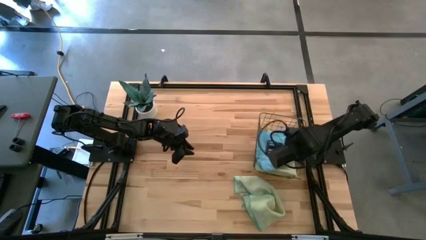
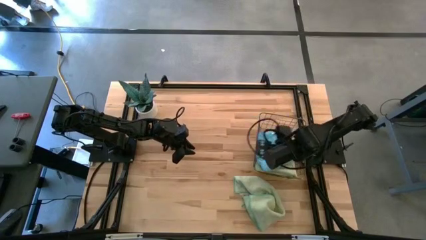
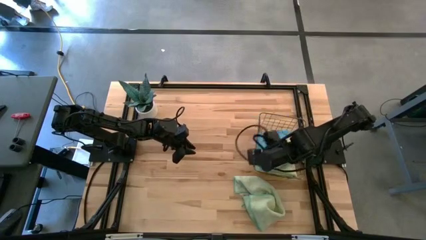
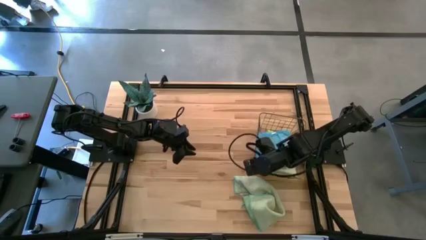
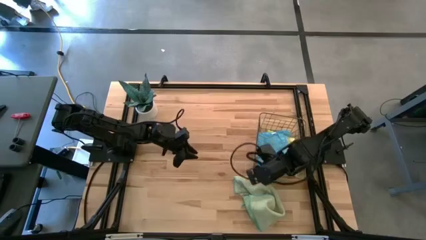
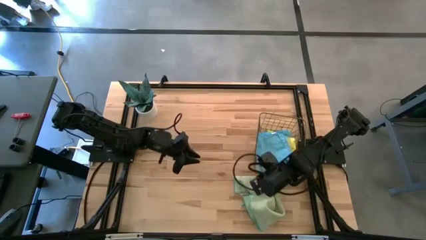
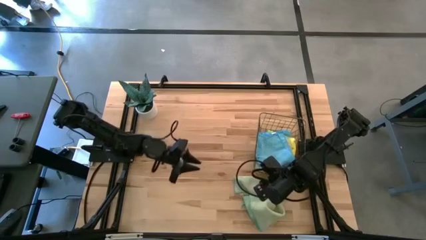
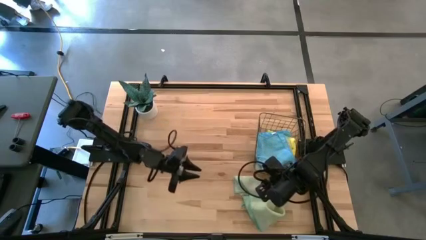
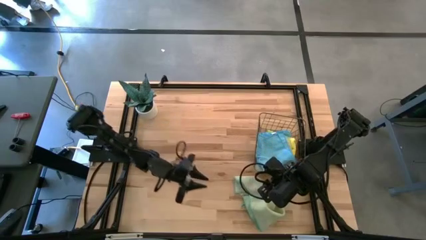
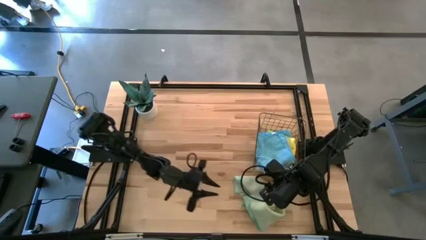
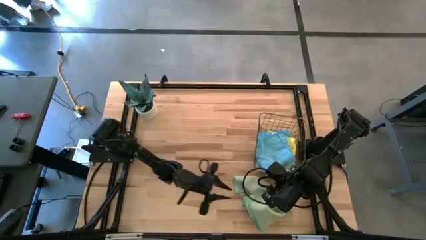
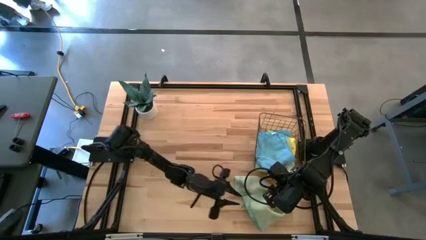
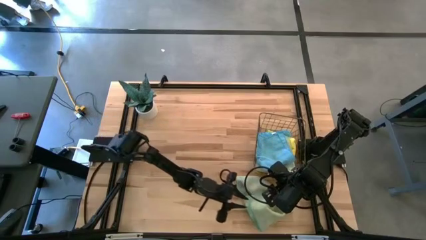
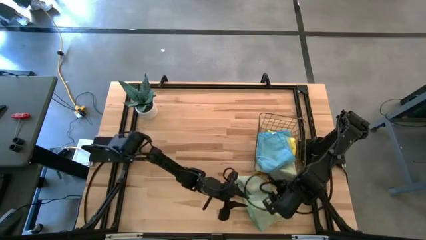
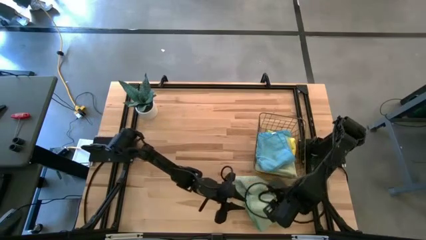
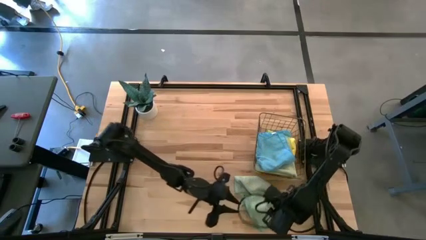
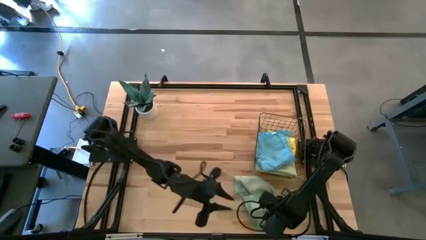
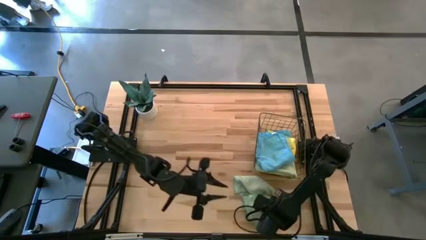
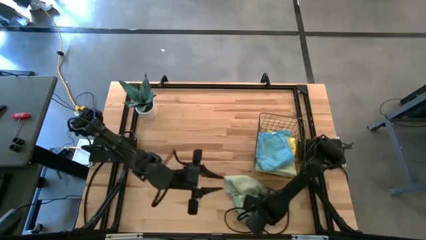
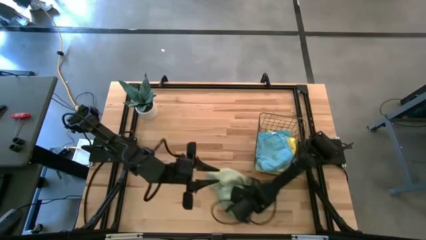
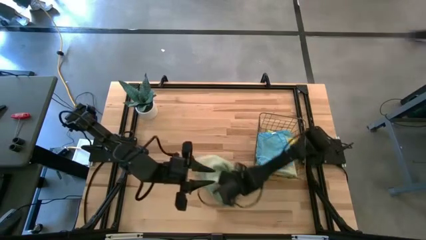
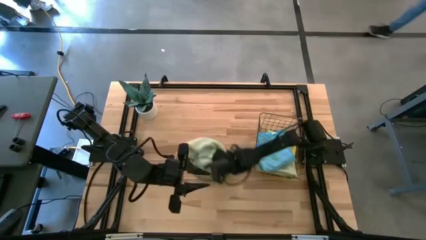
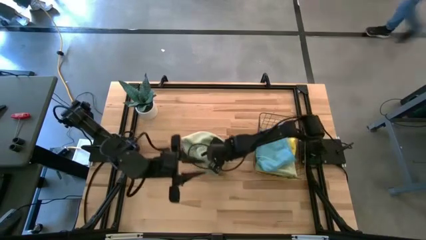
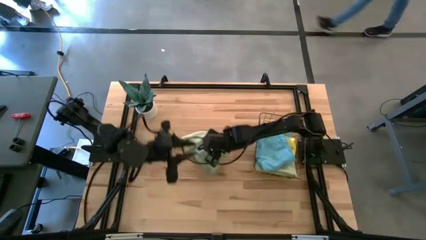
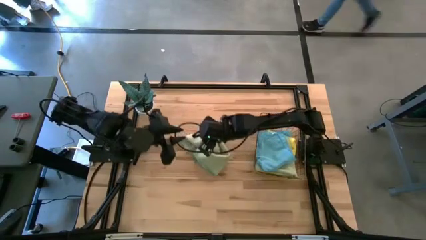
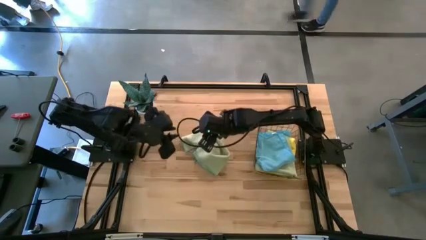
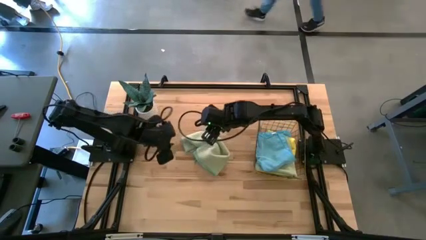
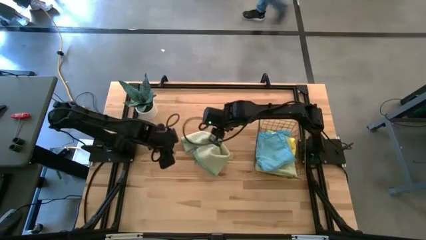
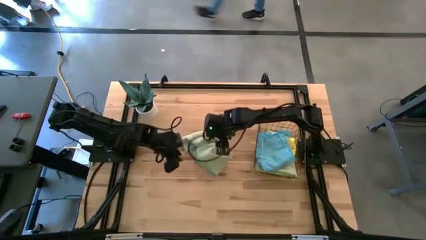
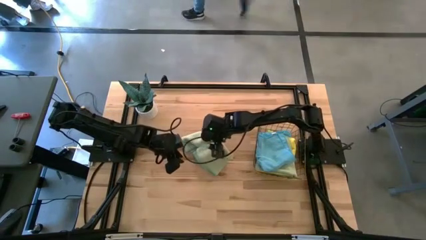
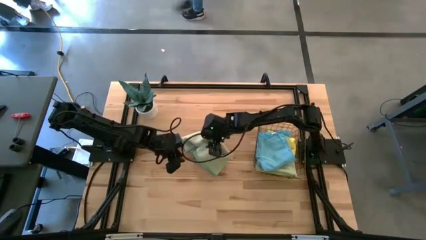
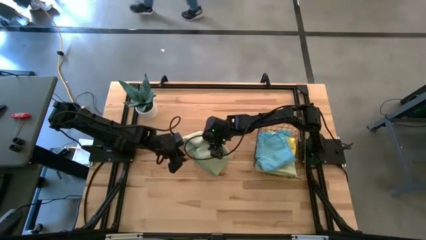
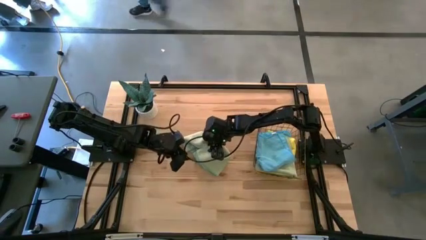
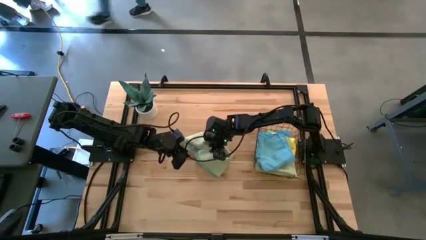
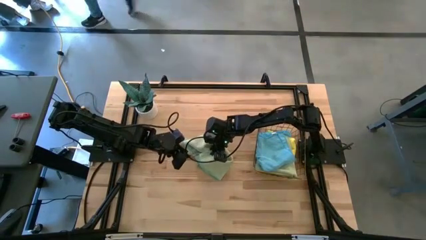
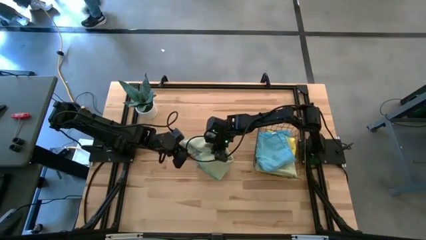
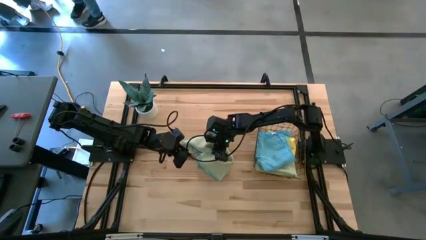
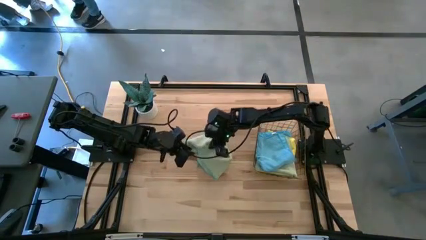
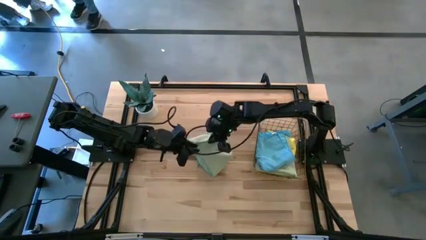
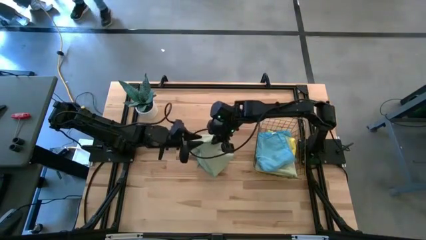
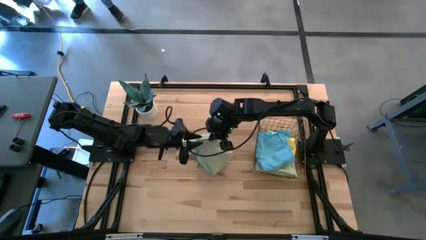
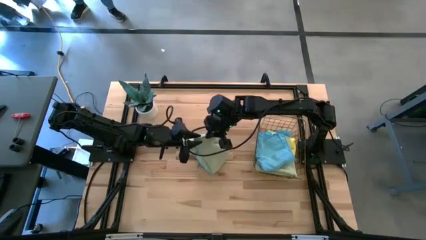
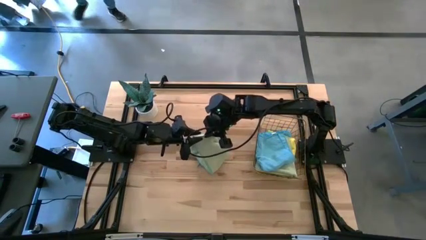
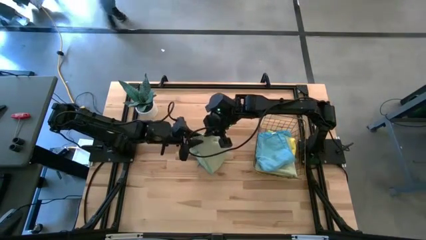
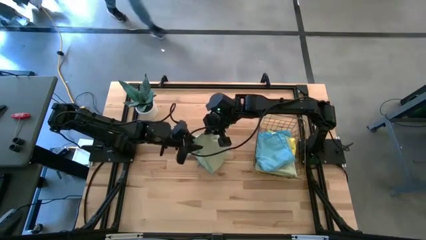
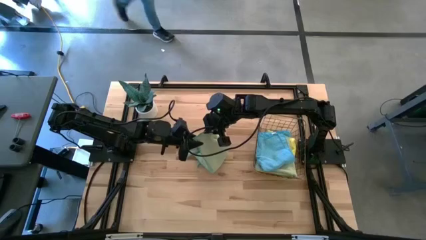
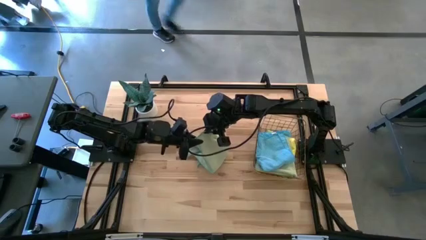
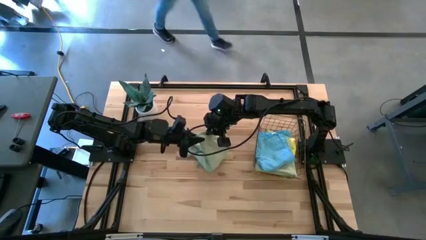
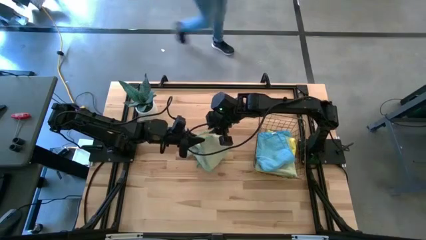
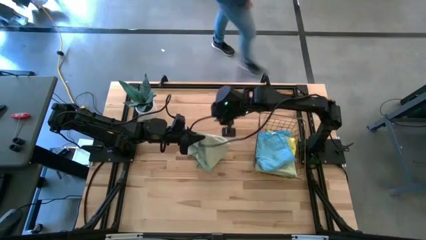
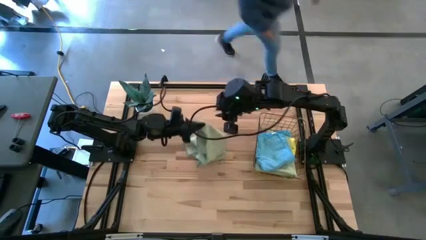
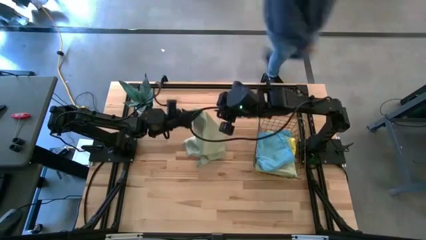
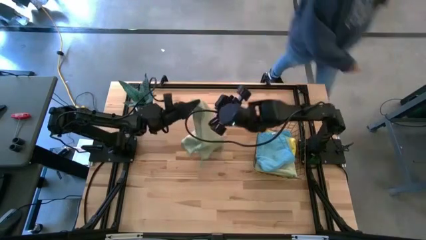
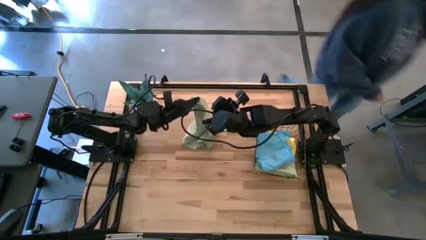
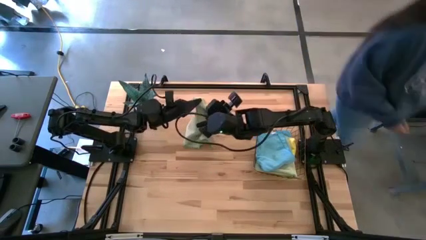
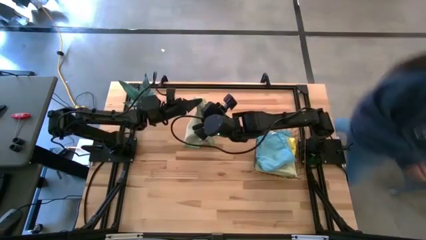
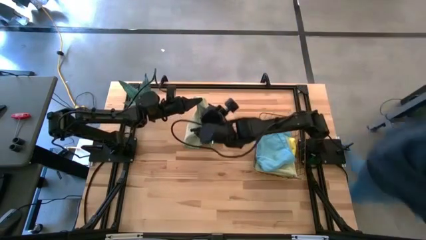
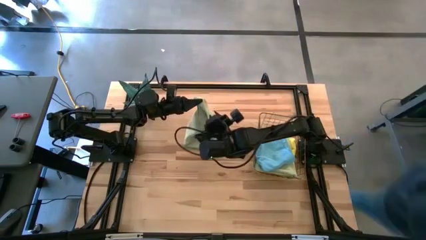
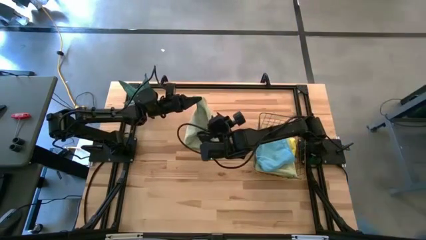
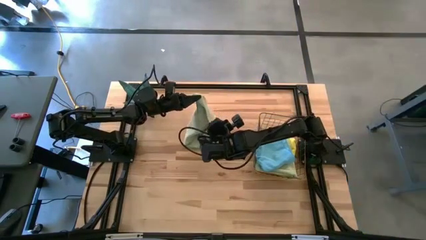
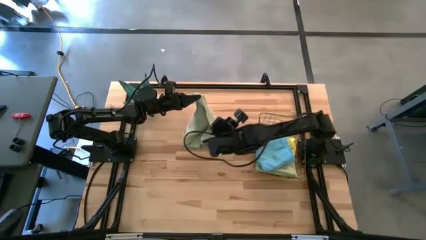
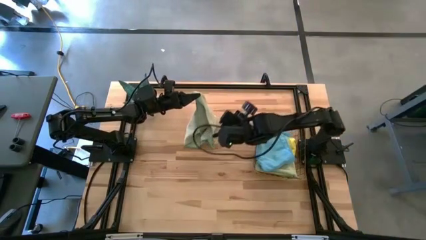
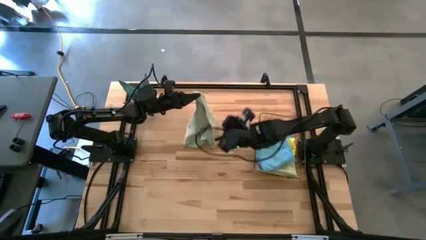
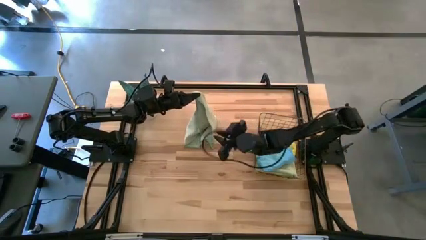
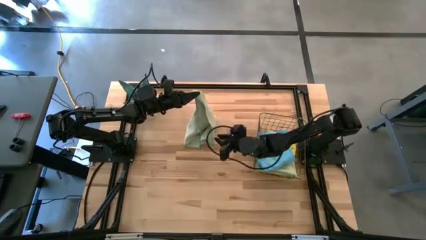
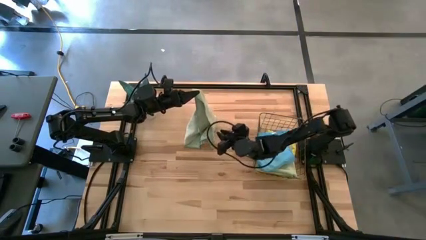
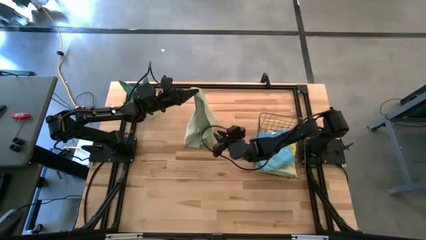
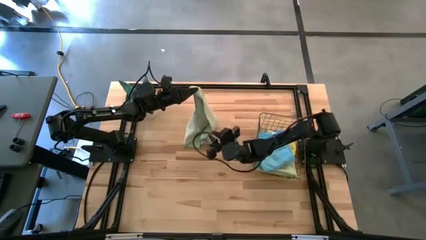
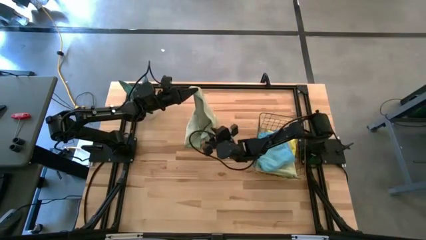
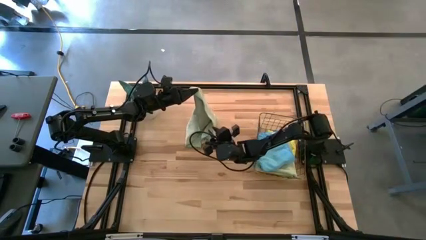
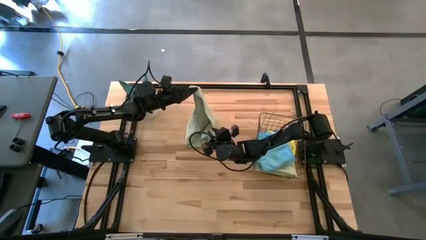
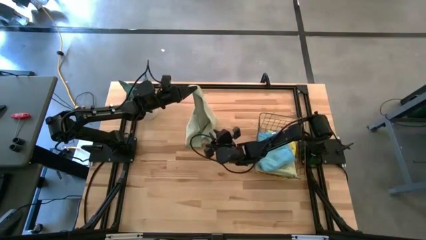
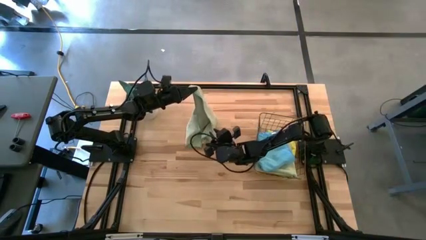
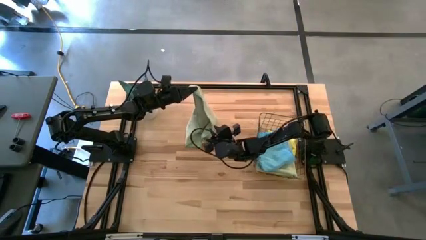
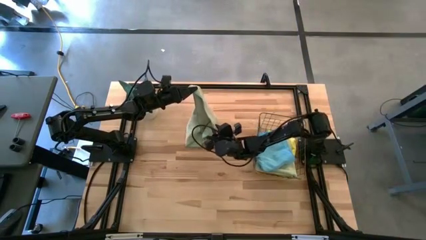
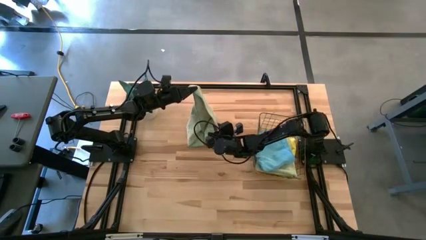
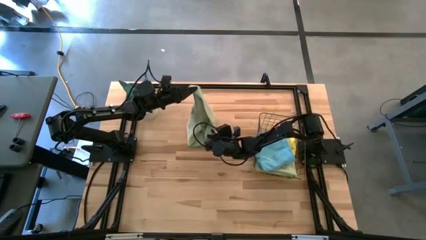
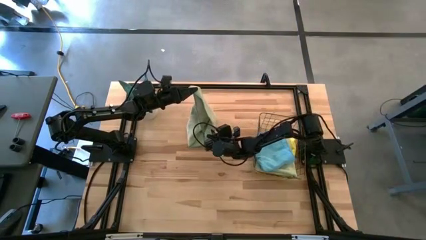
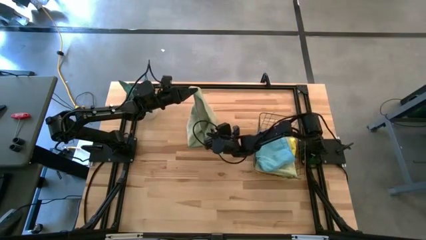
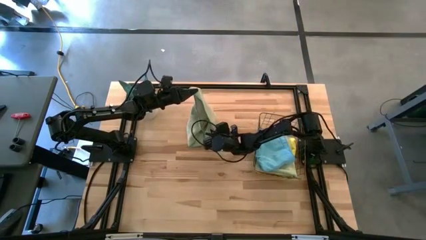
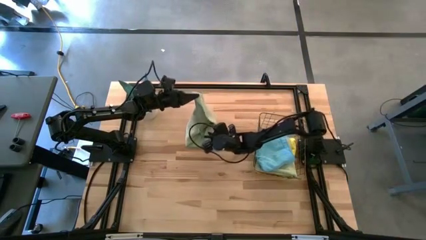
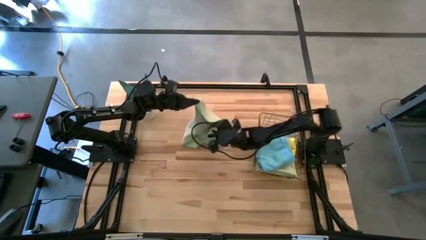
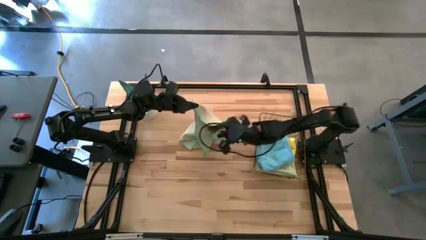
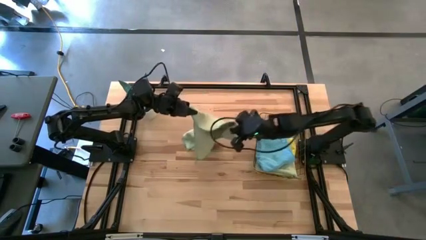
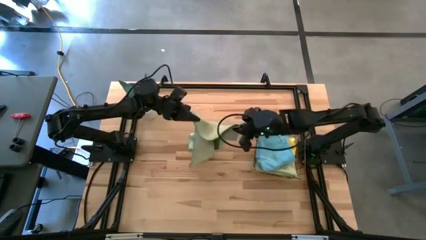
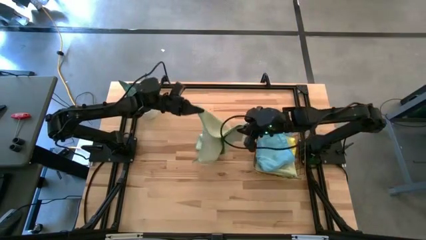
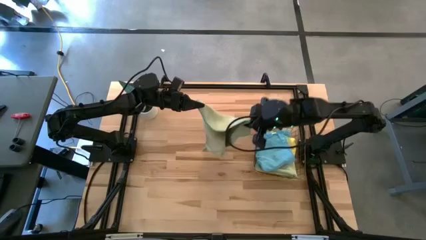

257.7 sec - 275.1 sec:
Task: Fold microfiber towels
Fold the green microfiber cloth
